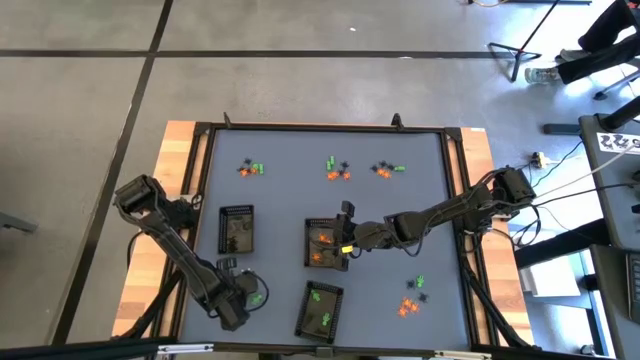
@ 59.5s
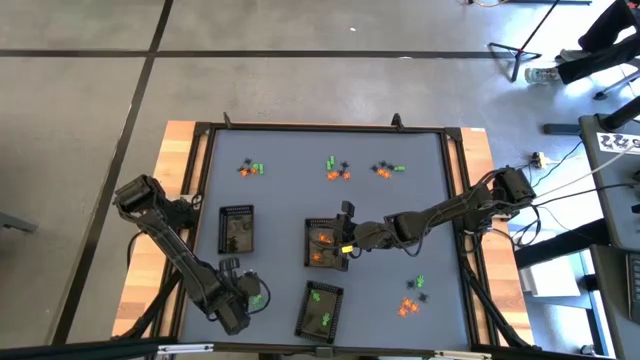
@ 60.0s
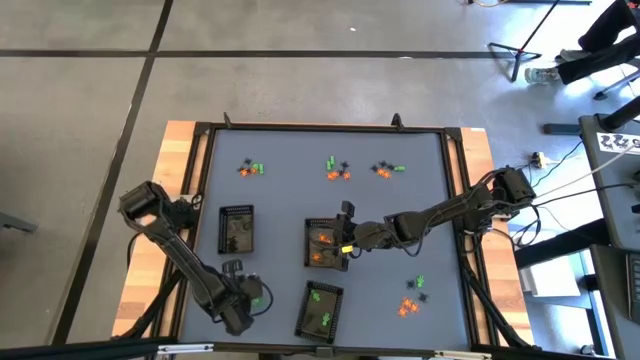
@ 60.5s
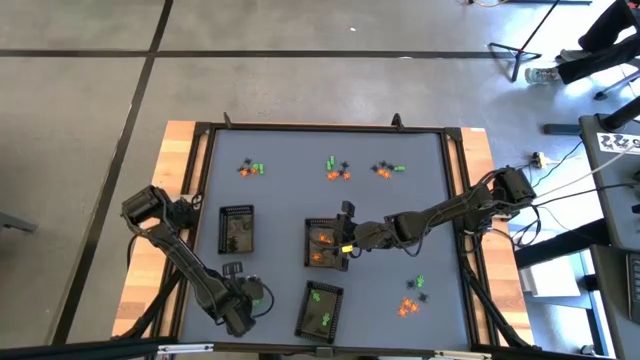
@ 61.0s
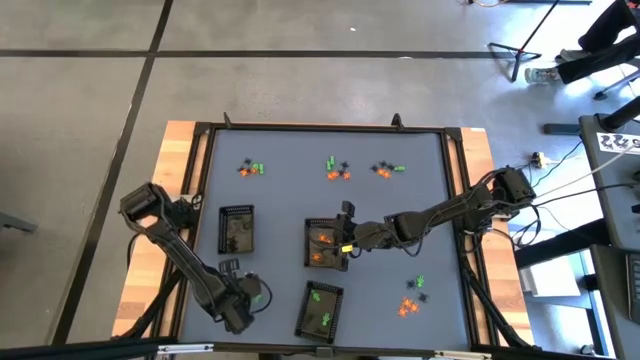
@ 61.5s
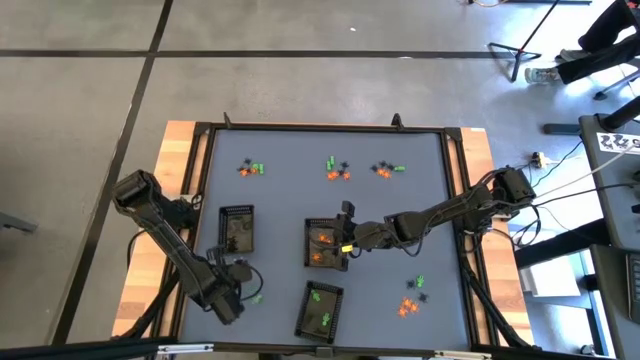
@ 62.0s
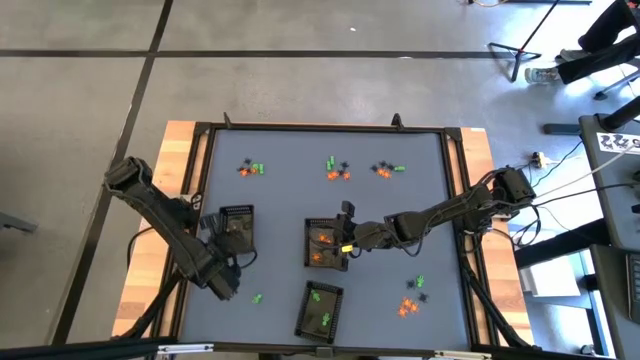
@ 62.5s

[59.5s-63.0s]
Task: Sort Halloween decoration
Put the black spider toy into the top left black basket

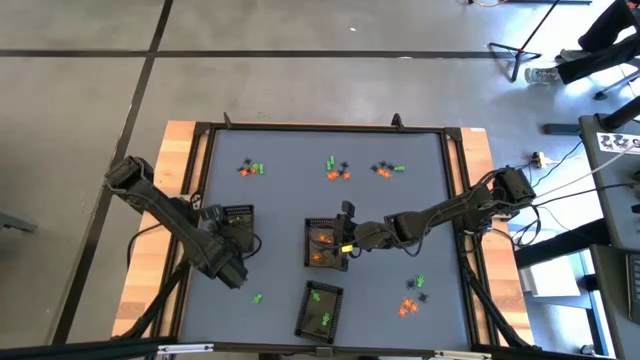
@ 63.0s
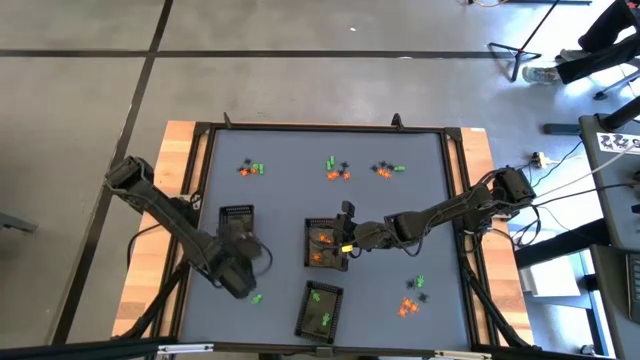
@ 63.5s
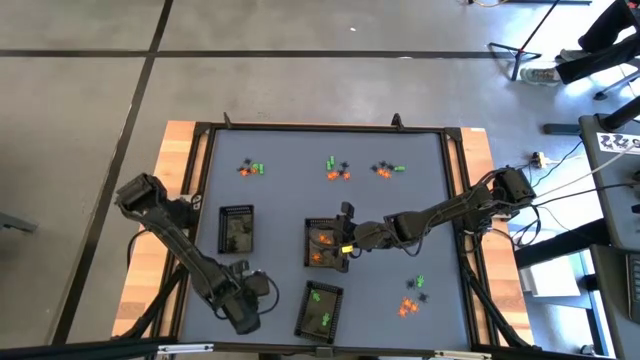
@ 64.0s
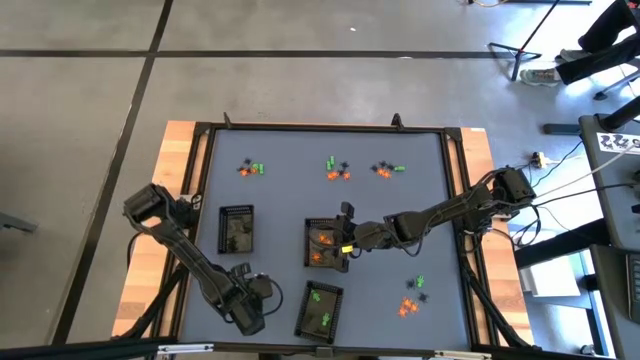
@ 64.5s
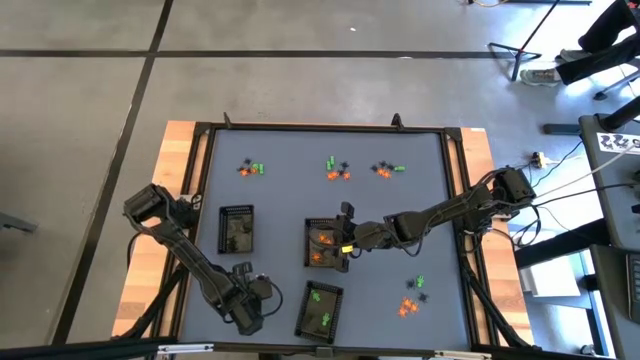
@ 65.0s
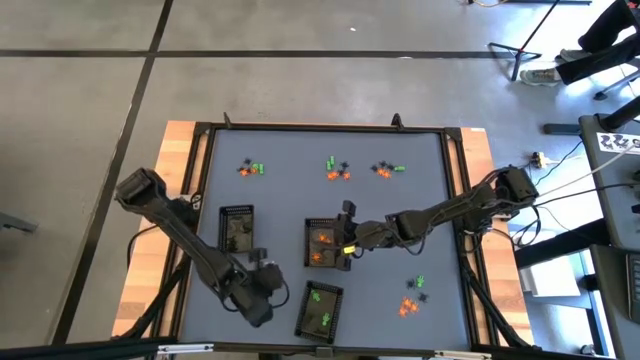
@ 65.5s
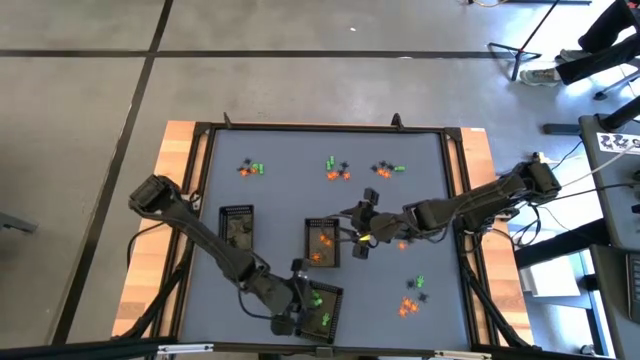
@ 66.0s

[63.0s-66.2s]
Put the green toy skeleton into the bottom black basket

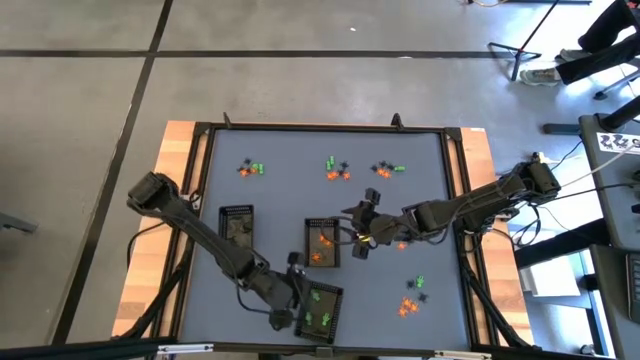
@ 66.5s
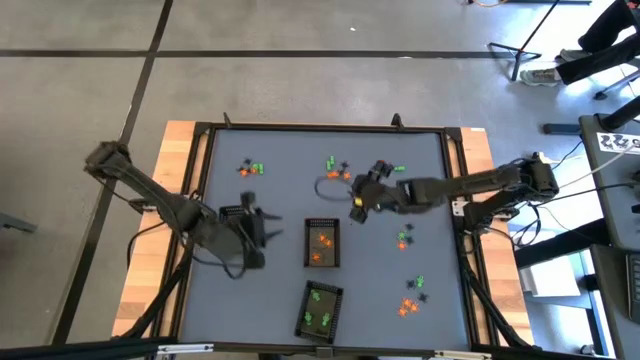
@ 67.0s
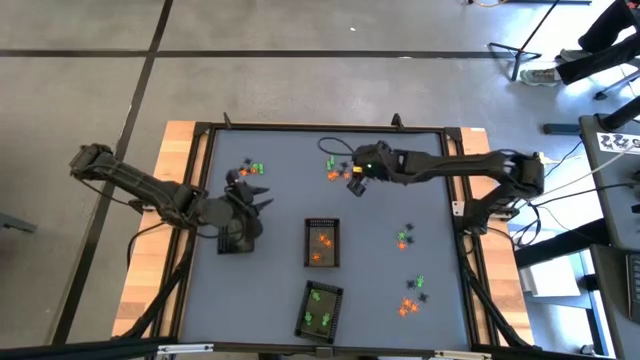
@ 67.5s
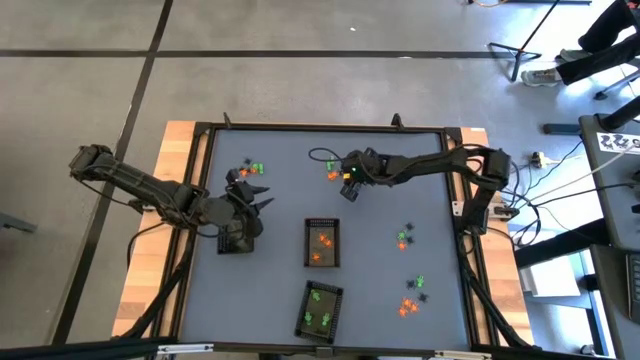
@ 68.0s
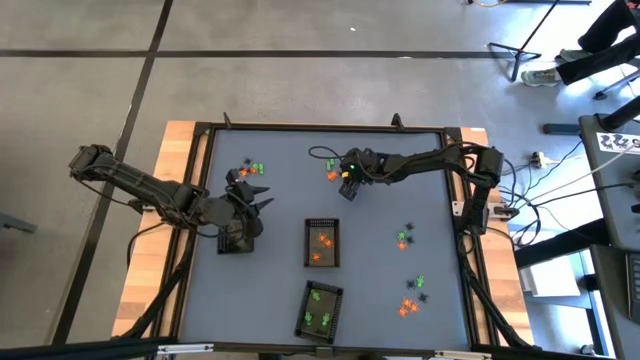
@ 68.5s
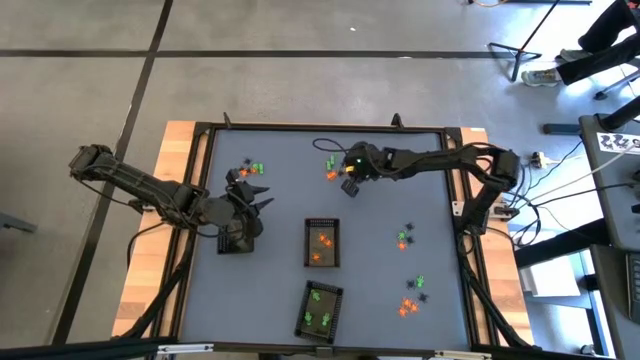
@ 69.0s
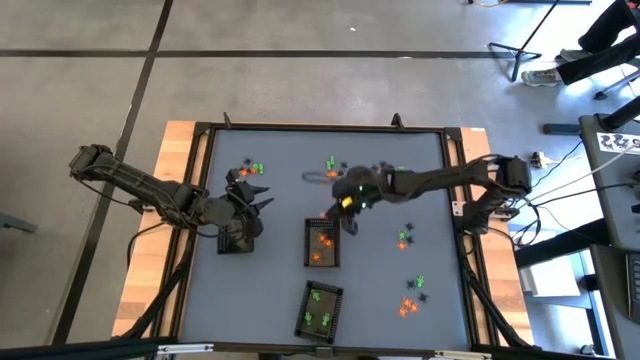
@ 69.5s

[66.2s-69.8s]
Put the orange spider toy into the top right black basket

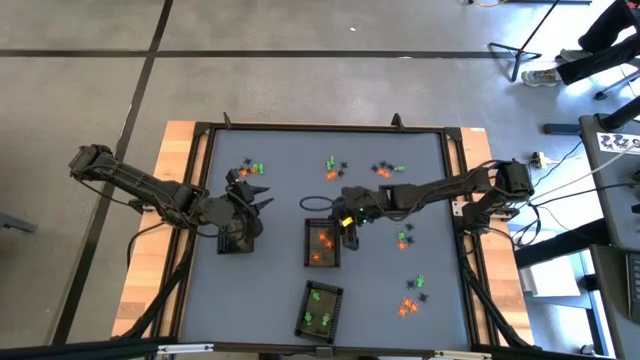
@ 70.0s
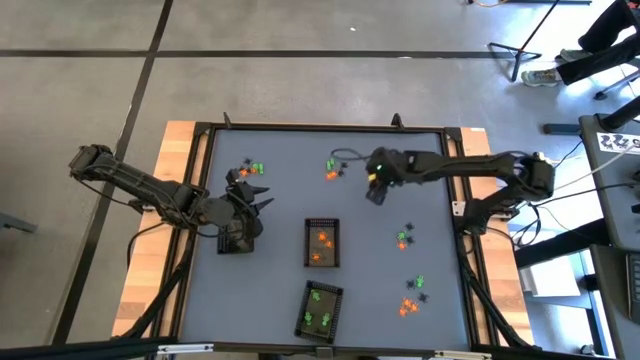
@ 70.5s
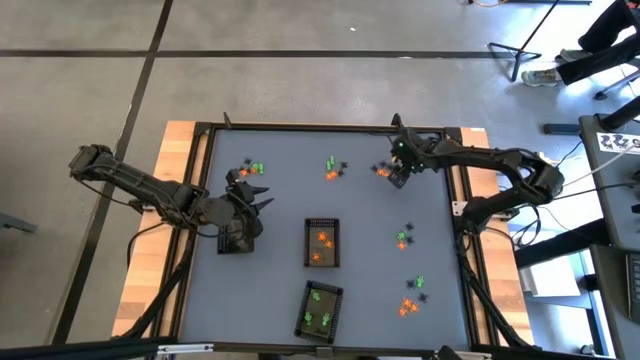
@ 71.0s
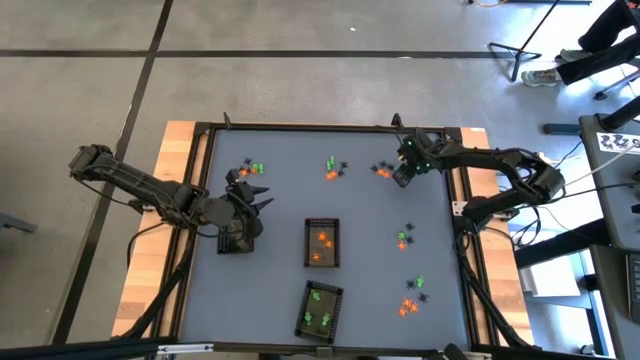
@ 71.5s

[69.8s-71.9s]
Put the green toy skeleton into the bottom black basket

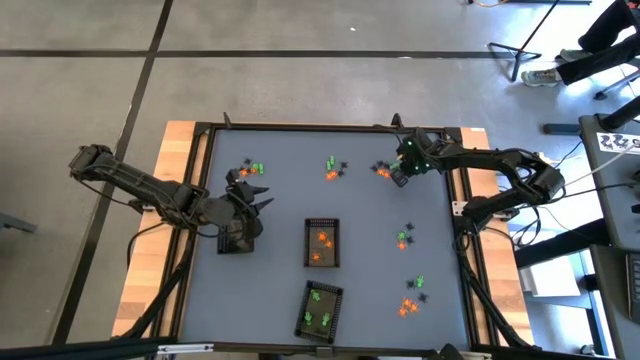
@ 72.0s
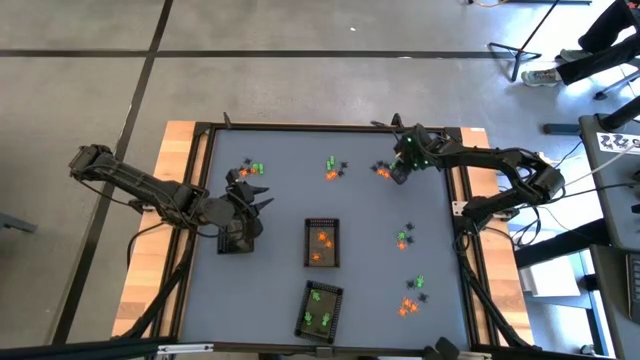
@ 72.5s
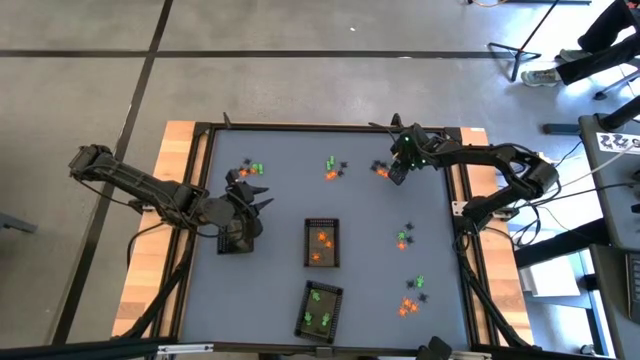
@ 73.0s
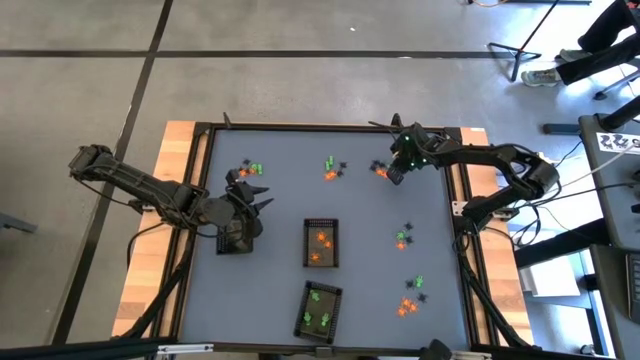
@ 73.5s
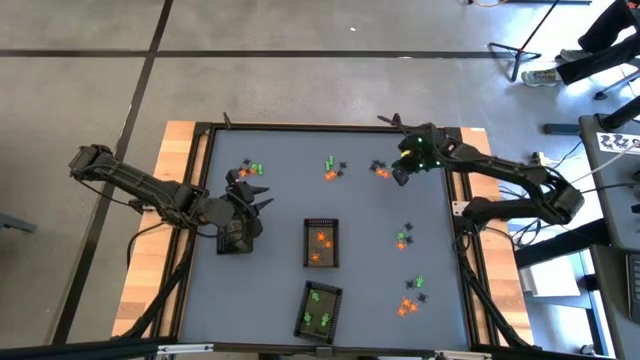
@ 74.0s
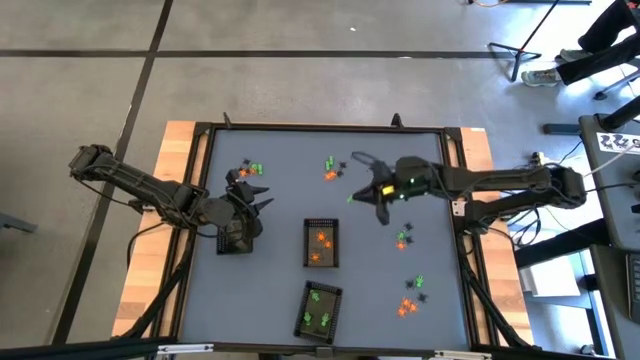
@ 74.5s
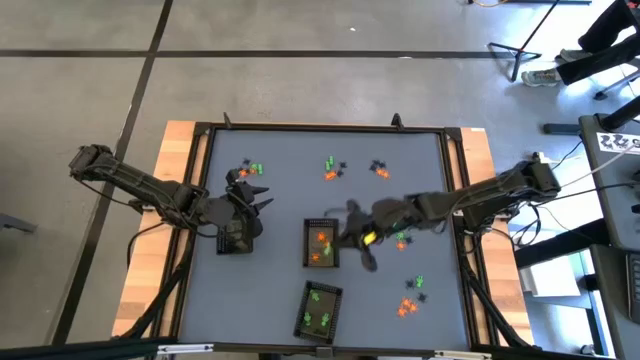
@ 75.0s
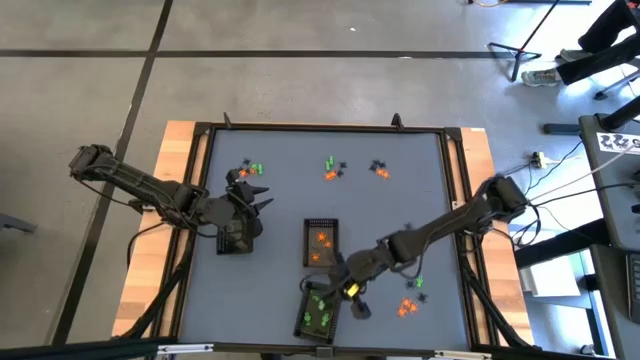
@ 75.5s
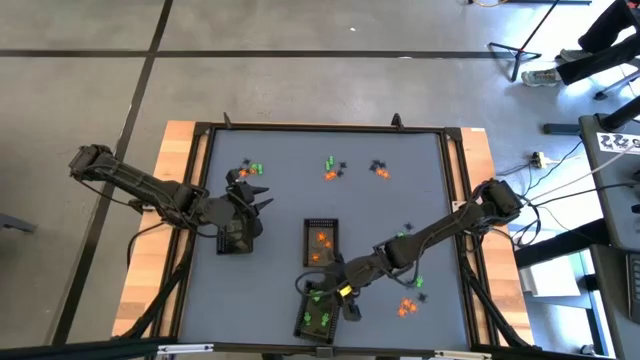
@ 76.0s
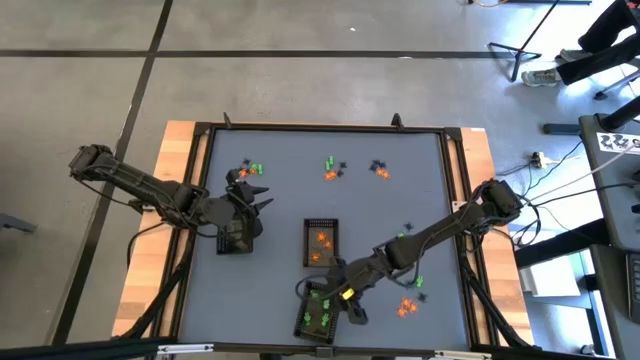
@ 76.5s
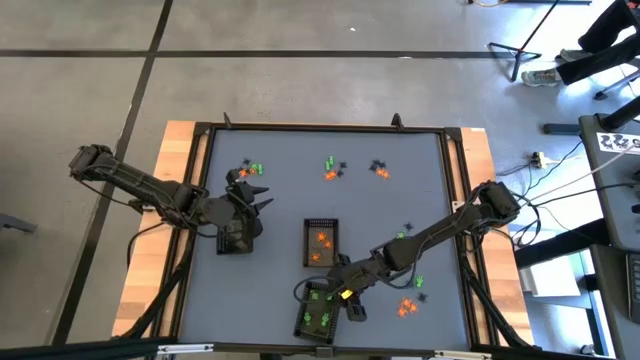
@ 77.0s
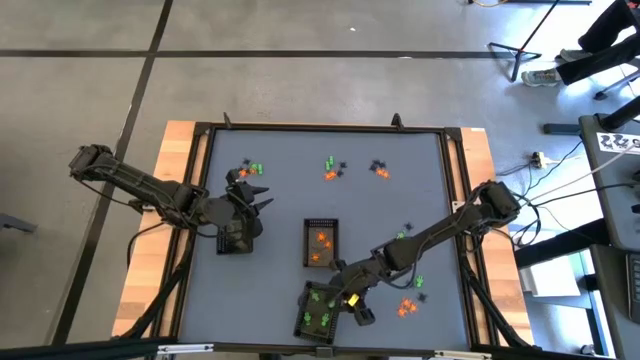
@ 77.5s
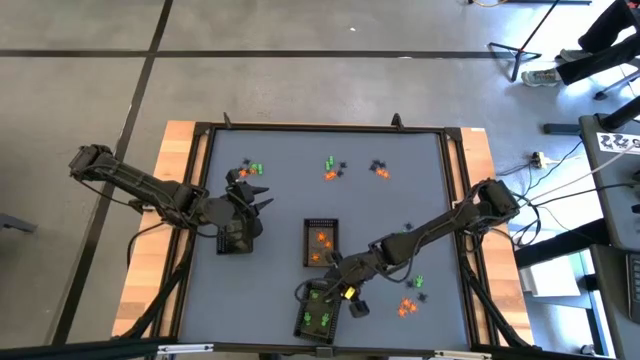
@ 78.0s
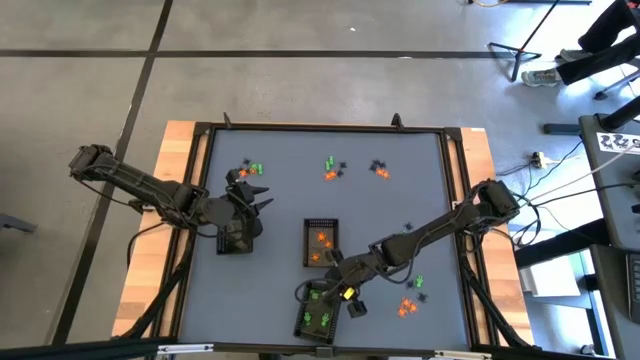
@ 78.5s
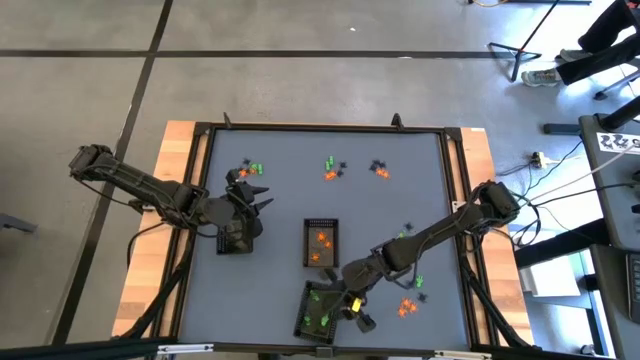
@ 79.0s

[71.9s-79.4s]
Put the green toy skeleton into the bottom black basket

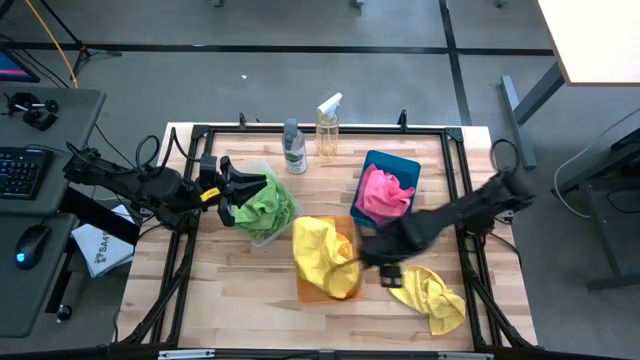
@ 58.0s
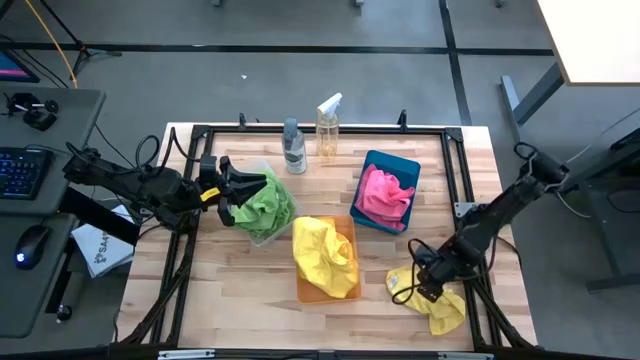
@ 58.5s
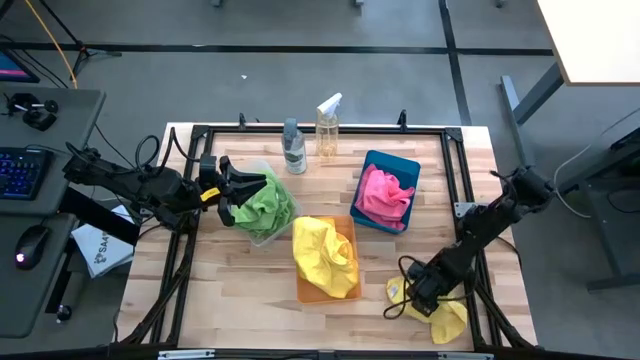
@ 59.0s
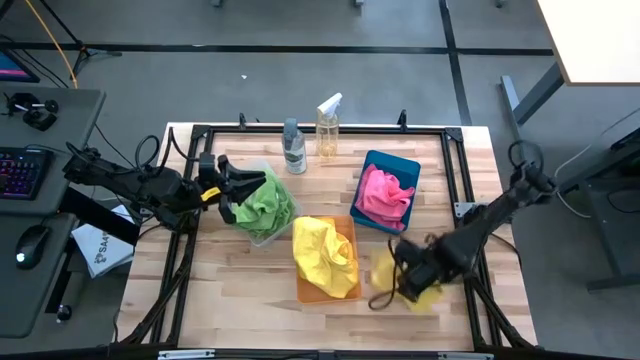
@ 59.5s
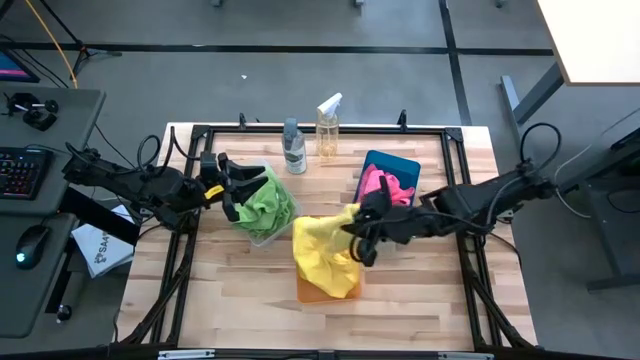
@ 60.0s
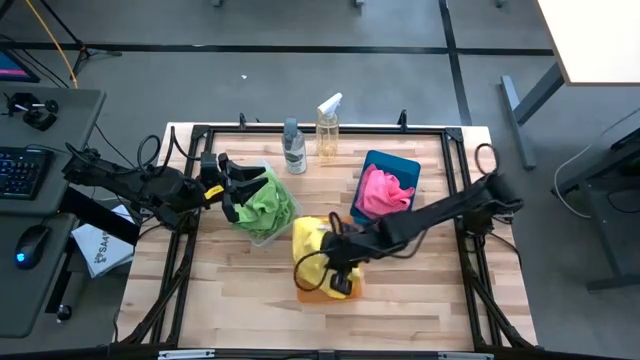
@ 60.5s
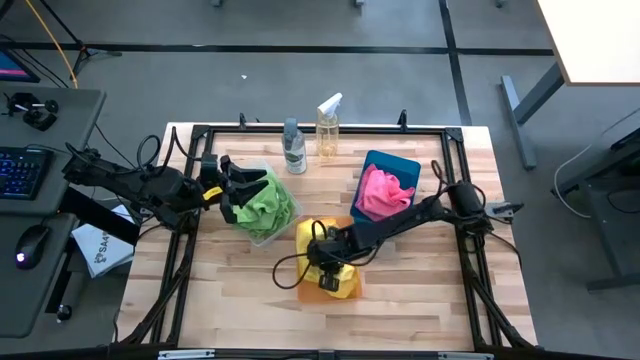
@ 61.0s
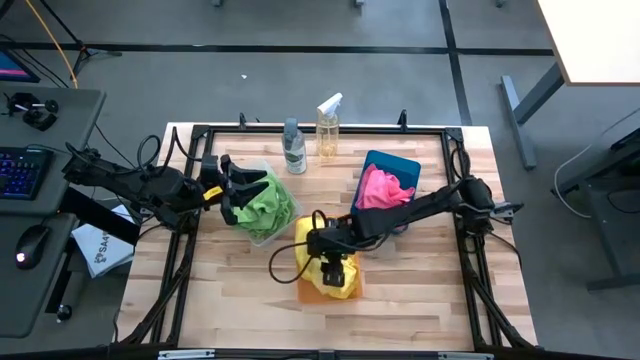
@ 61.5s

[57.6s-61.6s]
Task: Sort microfiber towel by color & place in baskets
Put the yellow microfiber towel into the orange bin
